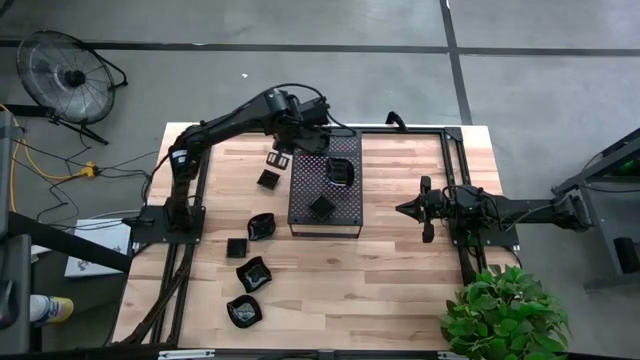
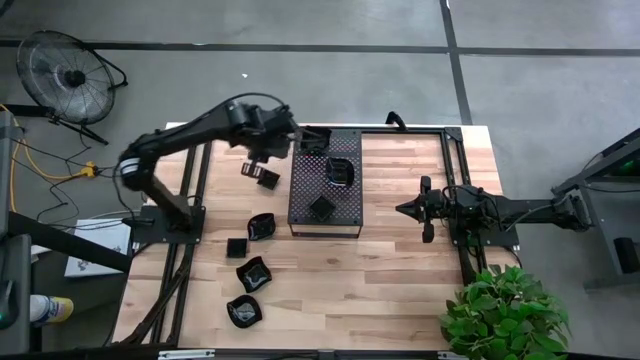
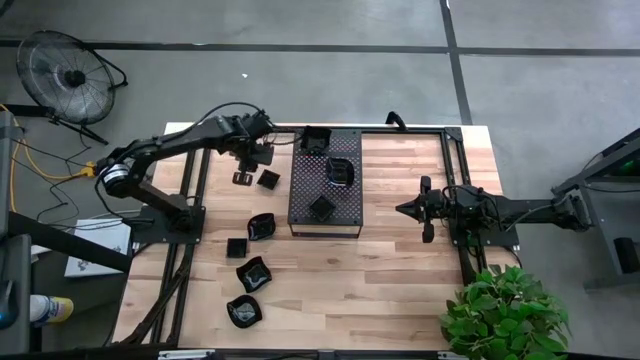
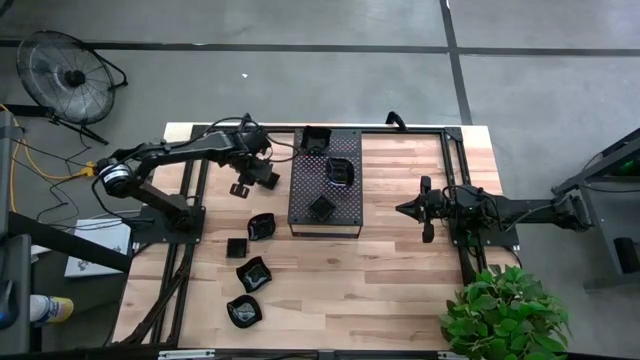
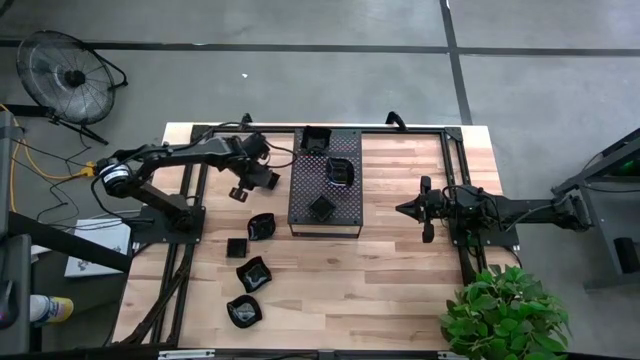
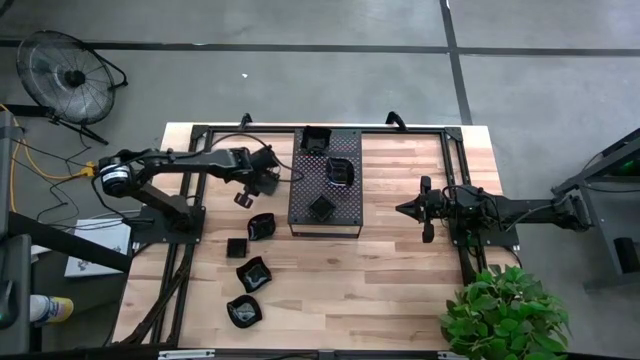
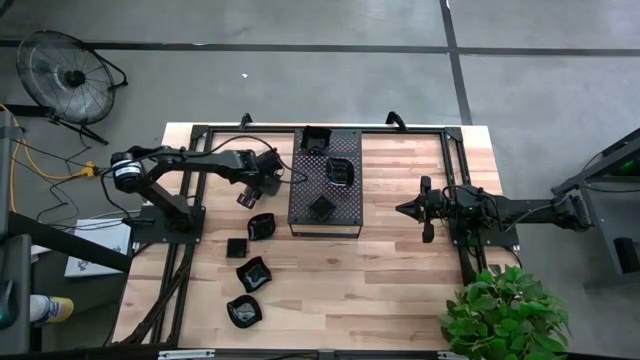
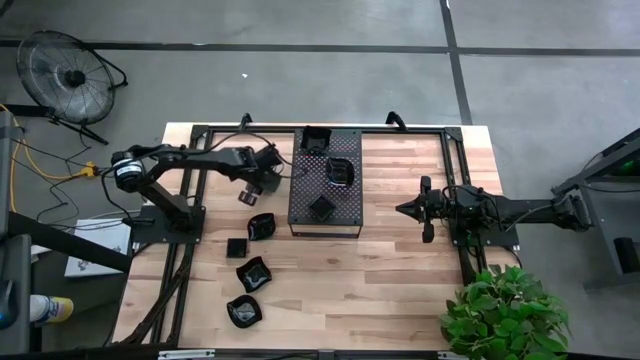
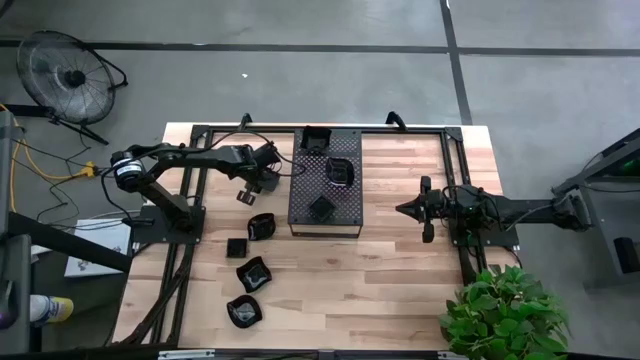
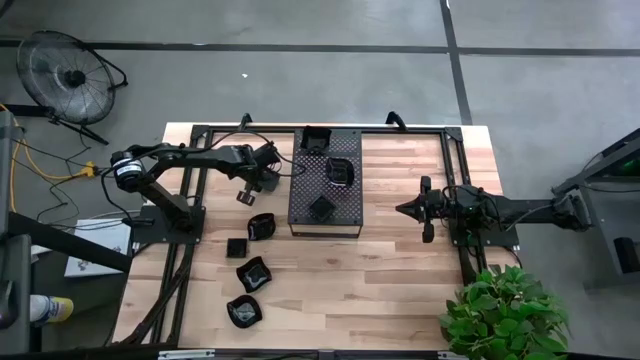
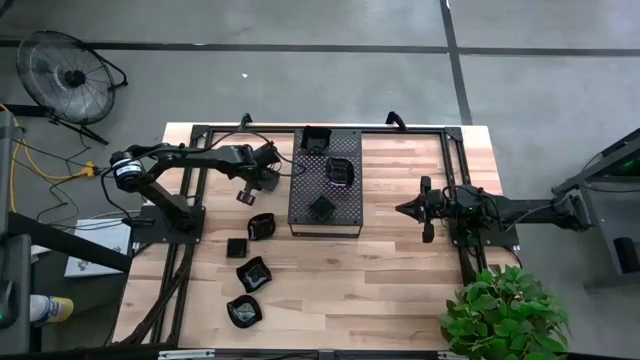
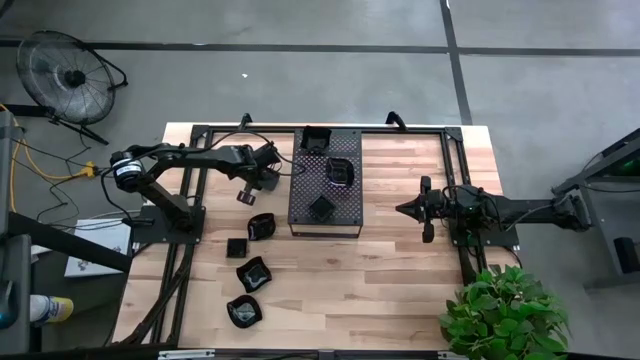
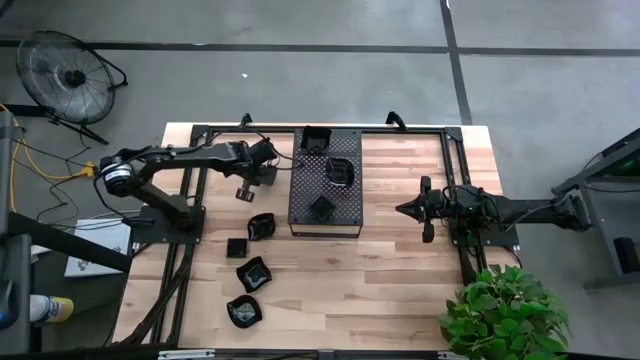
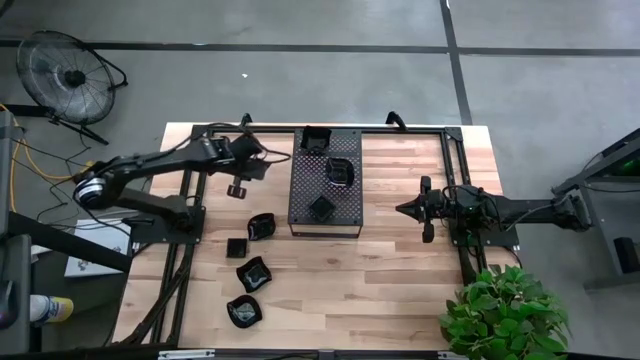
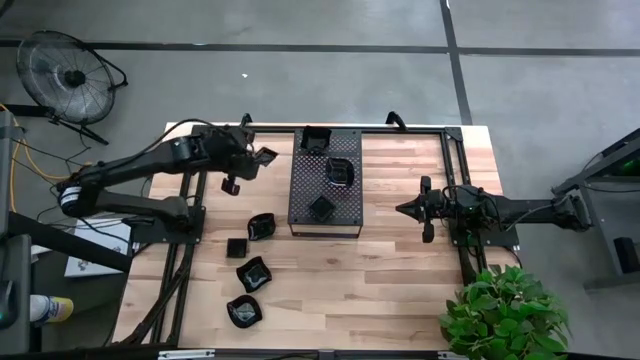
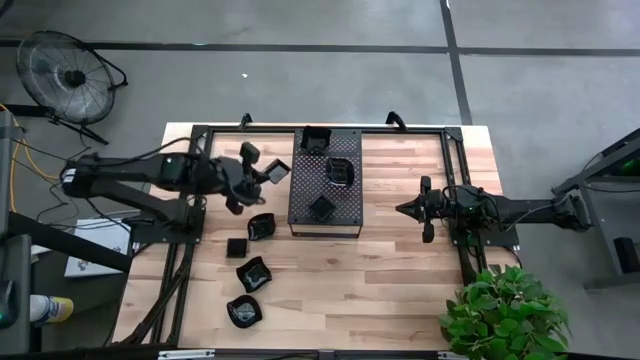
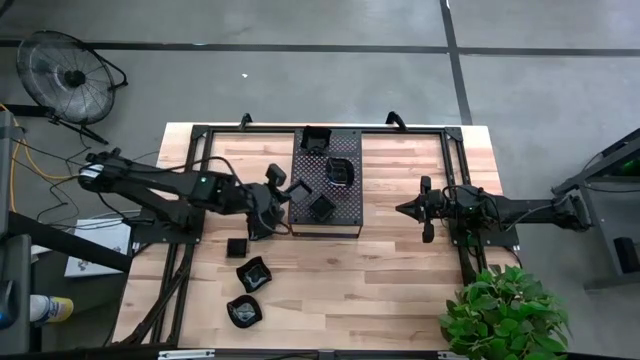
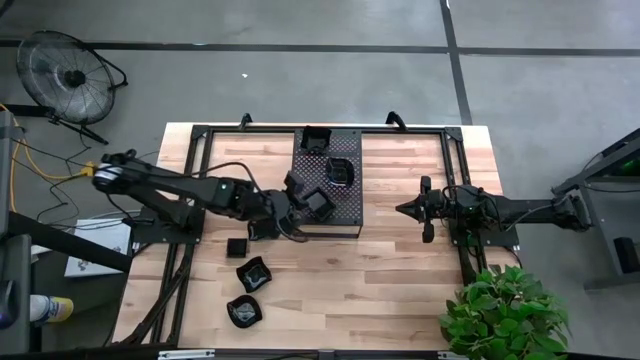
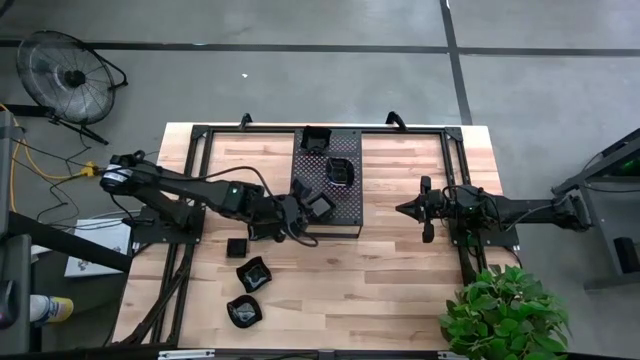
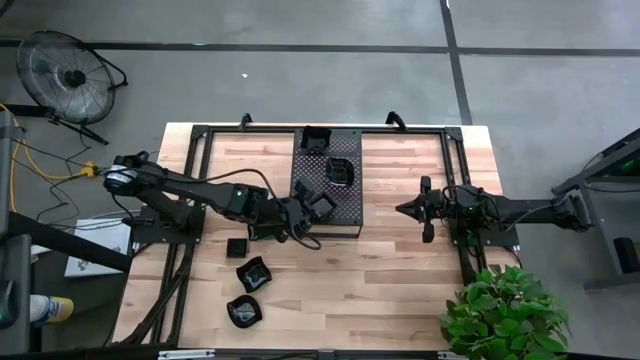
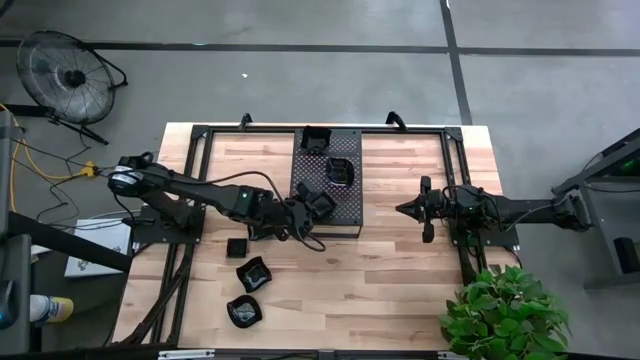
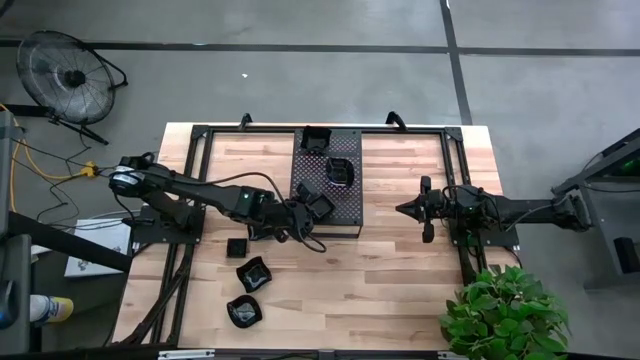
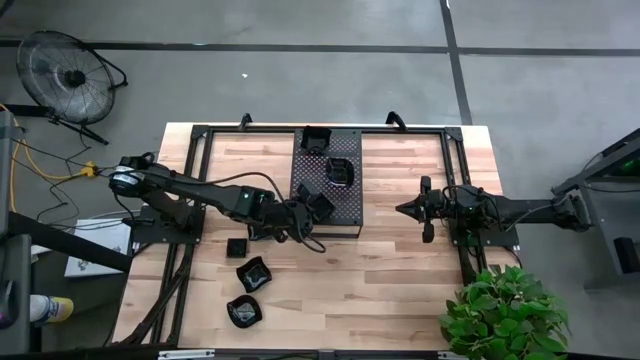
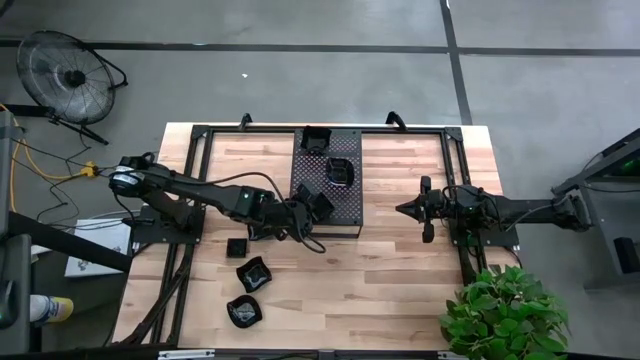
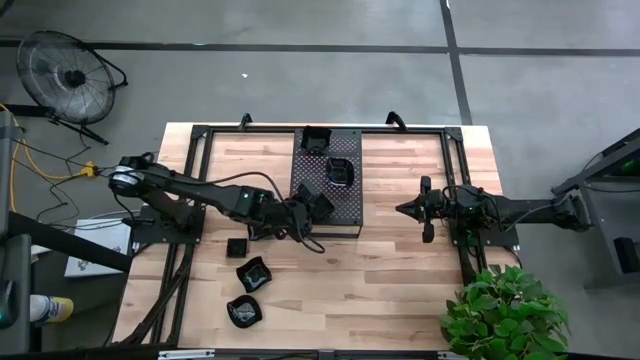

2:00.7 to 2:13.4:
Task: Pick & Place Mini shaped plates
Stack the black square shape plate on top of the other black square shape plate on the shelf

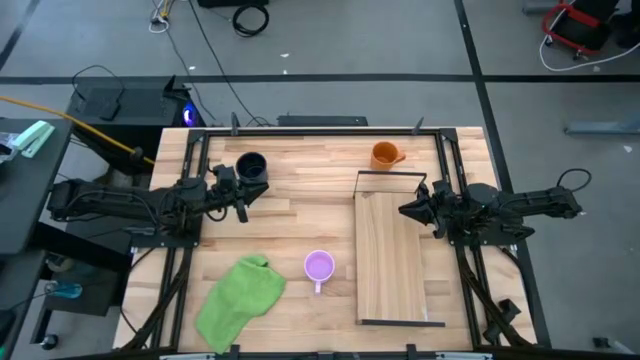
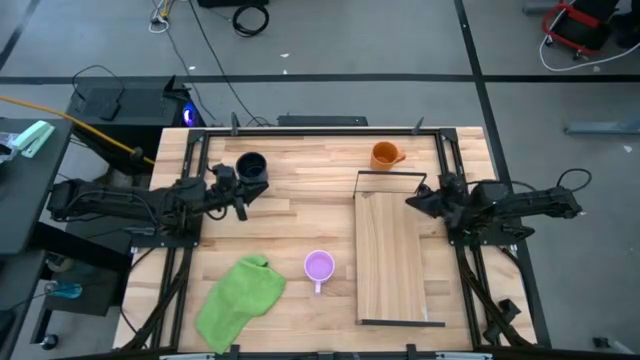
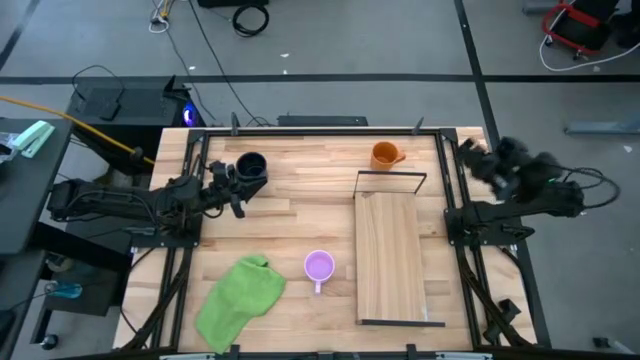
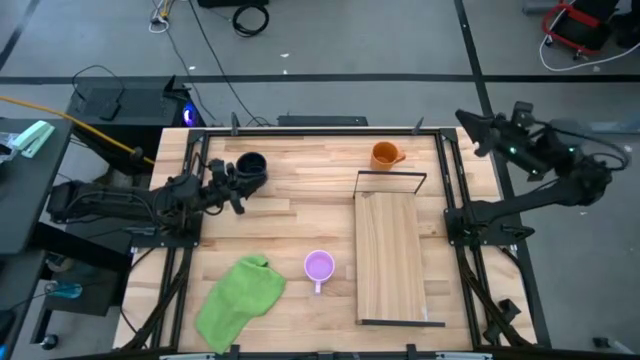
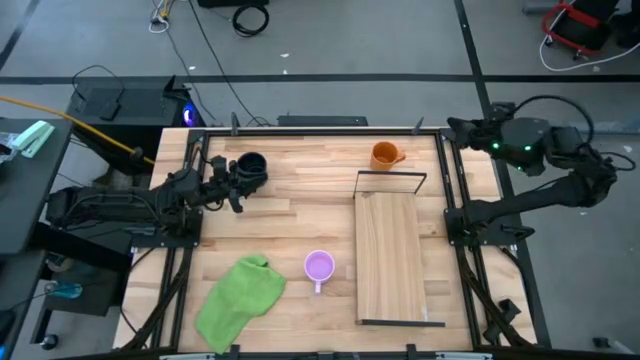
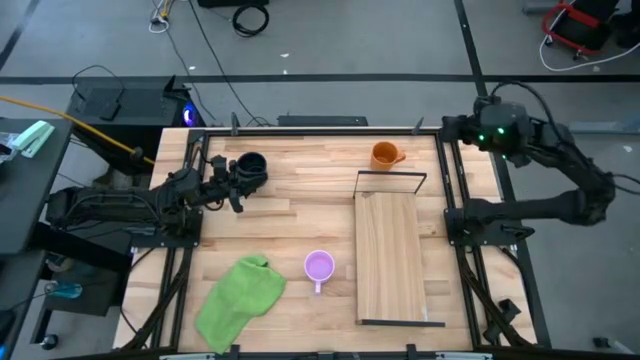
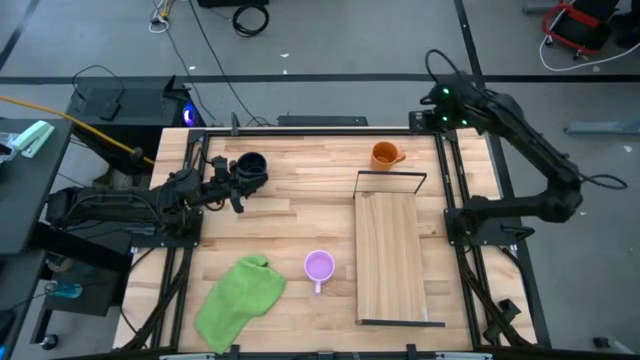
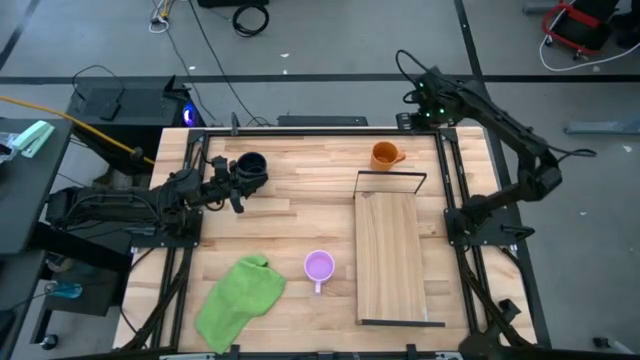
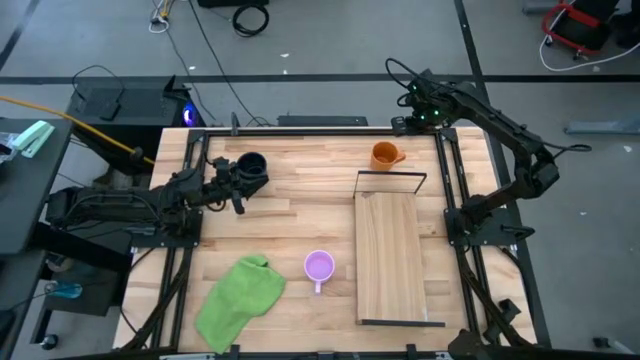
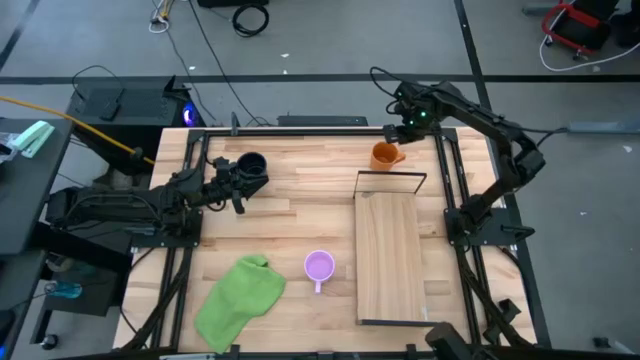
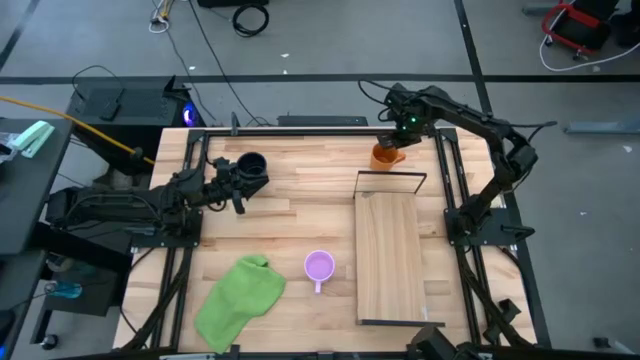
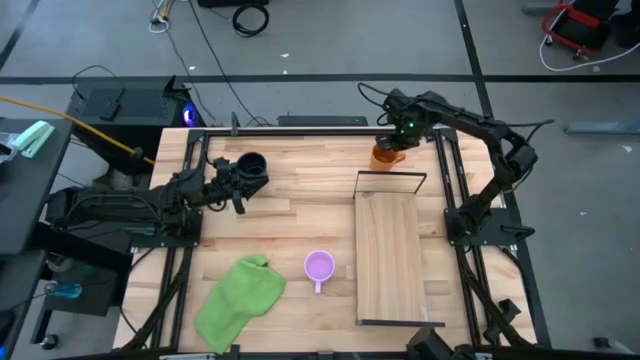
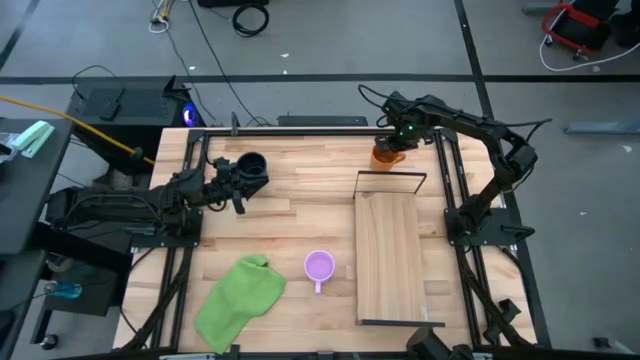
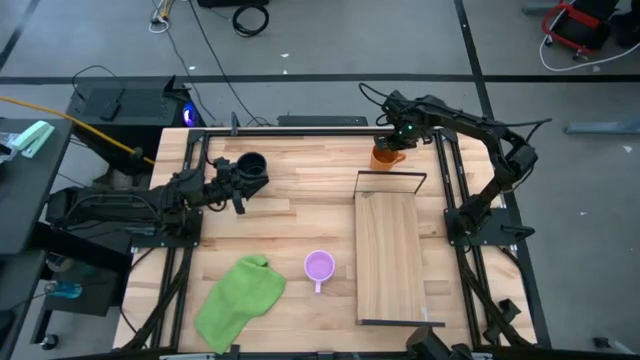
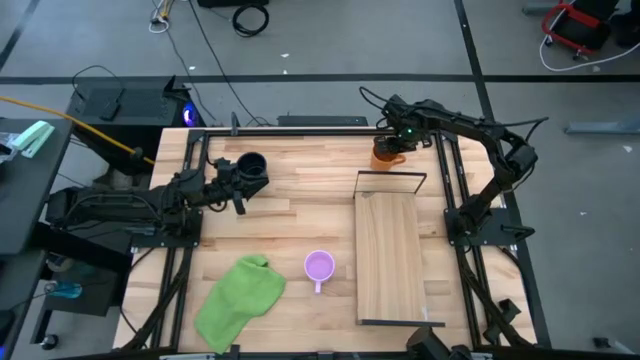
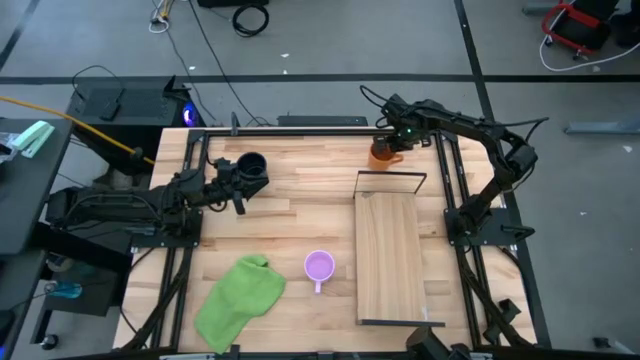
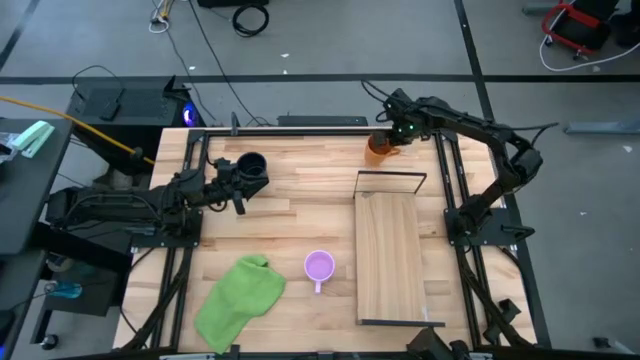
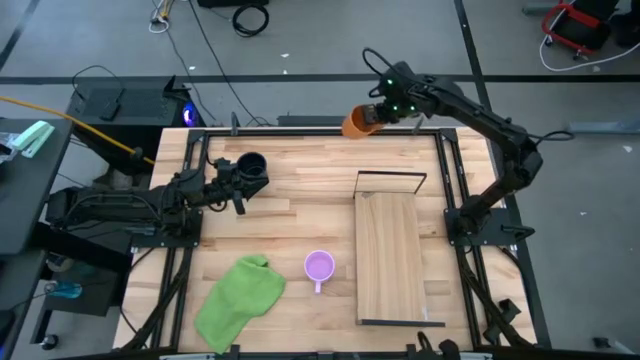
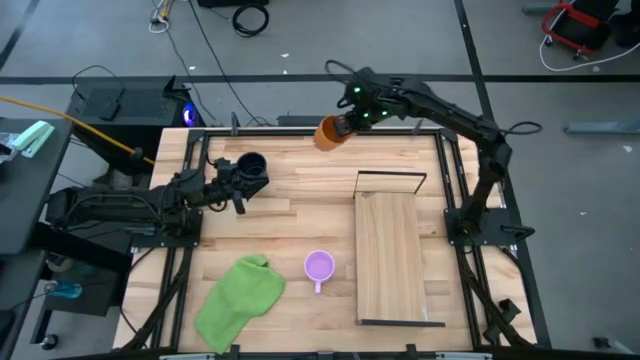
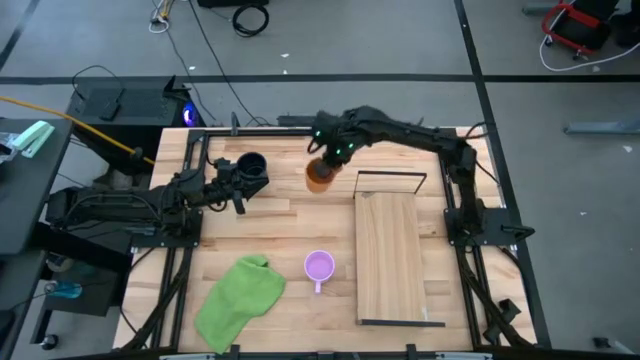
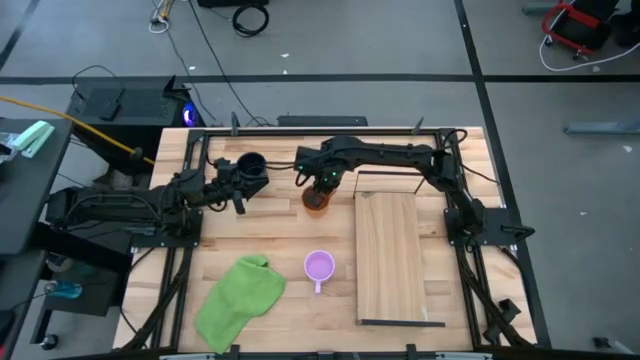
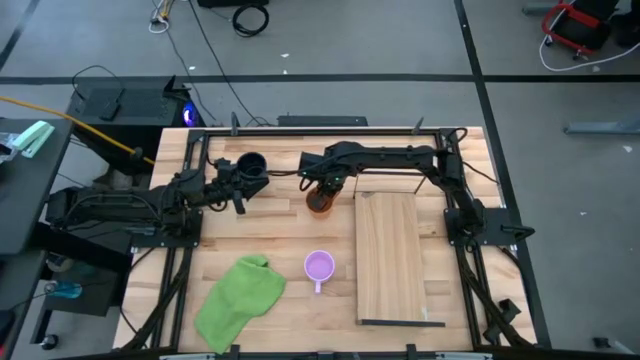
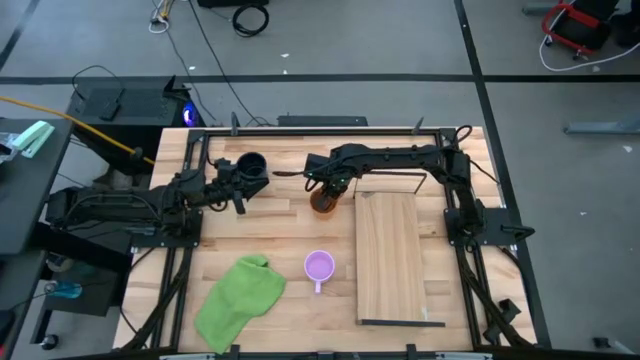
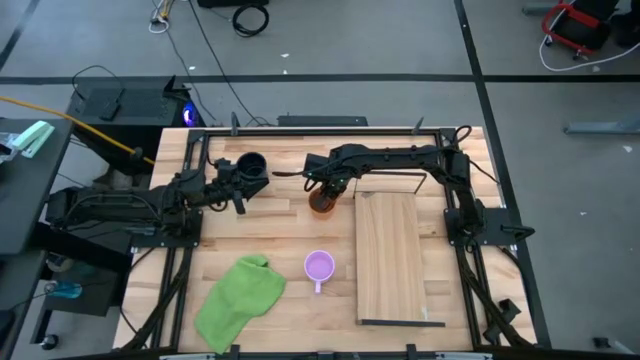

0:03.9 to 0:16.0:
Task: Stack small to large cups/mugs on shelf
Move the orange mug to the center of the table
